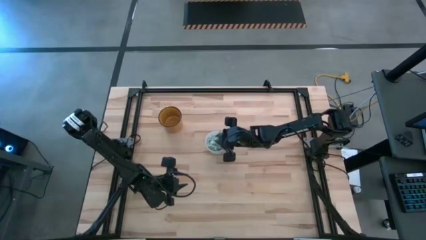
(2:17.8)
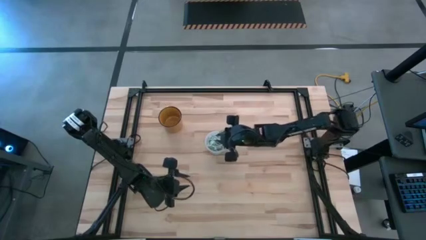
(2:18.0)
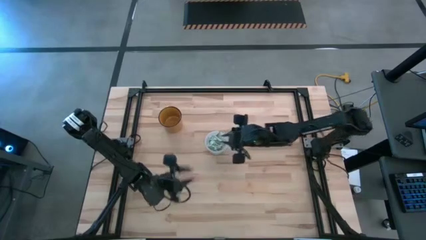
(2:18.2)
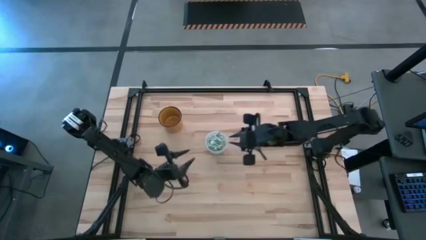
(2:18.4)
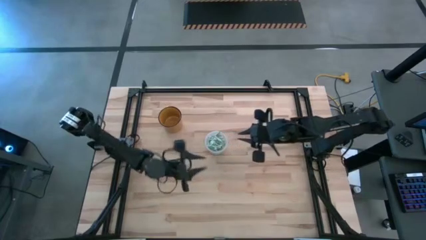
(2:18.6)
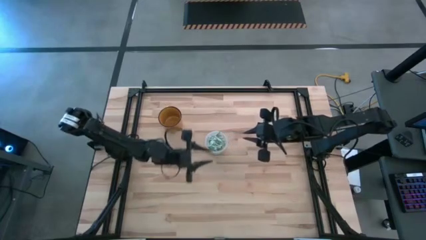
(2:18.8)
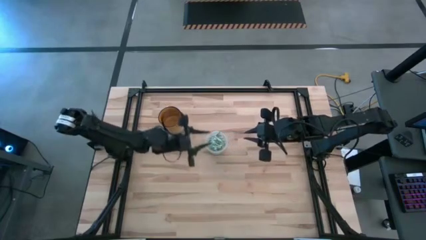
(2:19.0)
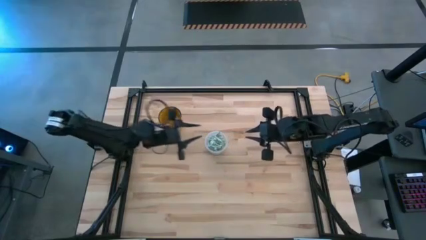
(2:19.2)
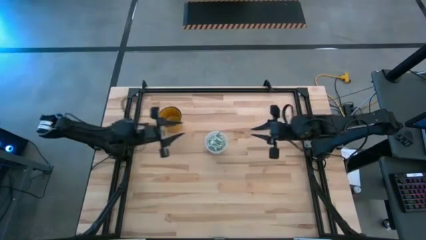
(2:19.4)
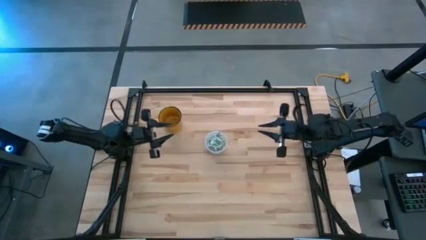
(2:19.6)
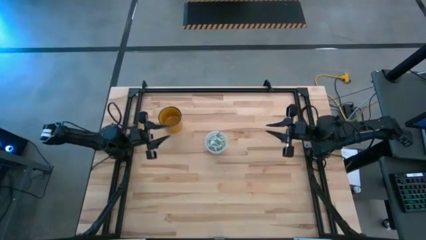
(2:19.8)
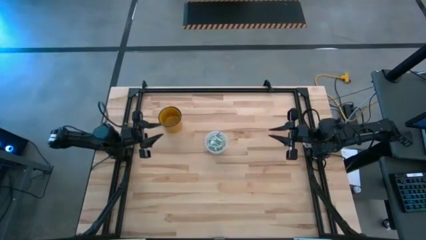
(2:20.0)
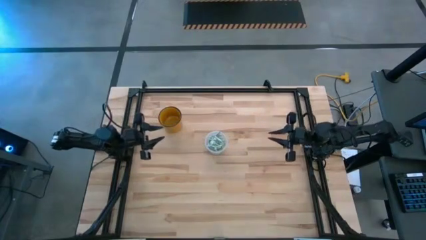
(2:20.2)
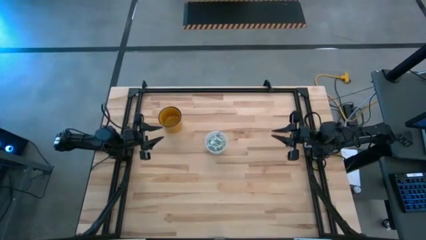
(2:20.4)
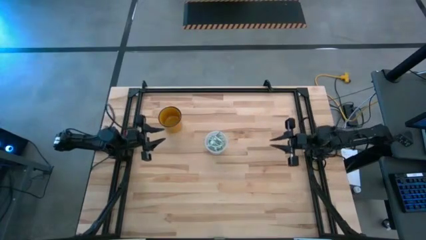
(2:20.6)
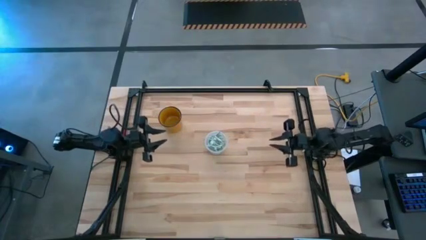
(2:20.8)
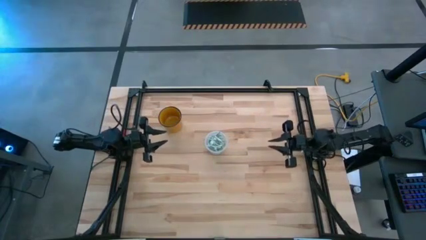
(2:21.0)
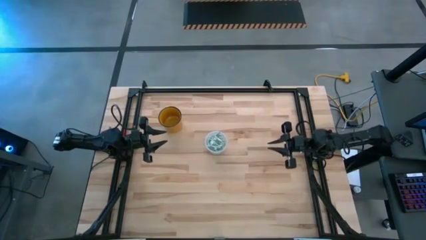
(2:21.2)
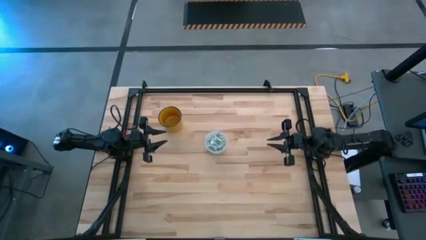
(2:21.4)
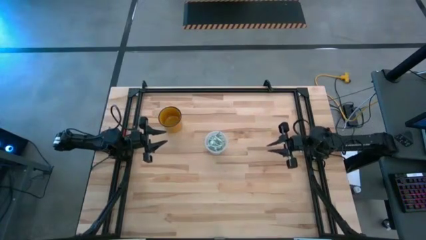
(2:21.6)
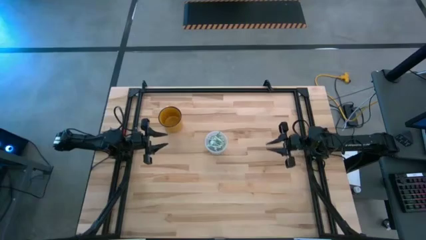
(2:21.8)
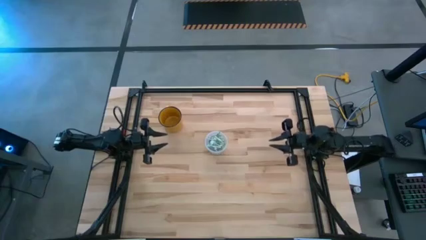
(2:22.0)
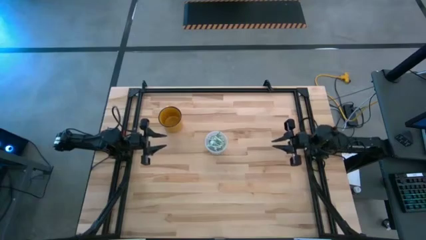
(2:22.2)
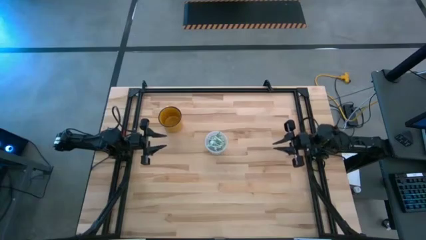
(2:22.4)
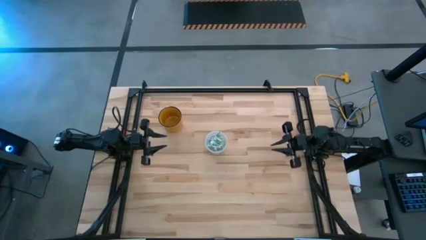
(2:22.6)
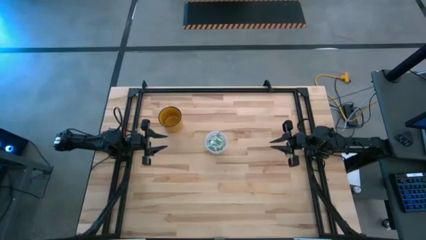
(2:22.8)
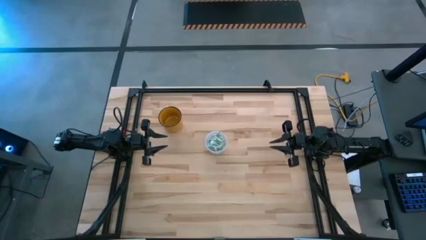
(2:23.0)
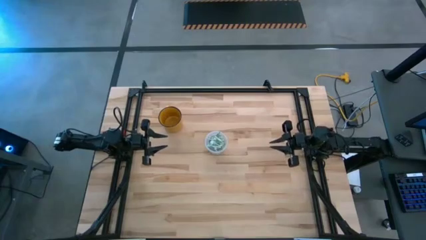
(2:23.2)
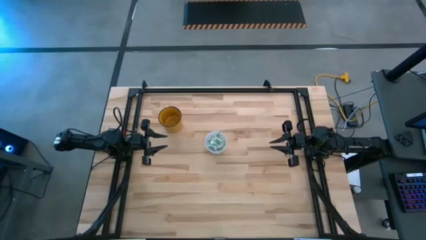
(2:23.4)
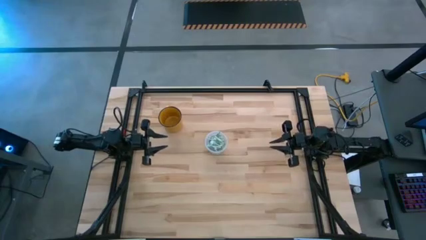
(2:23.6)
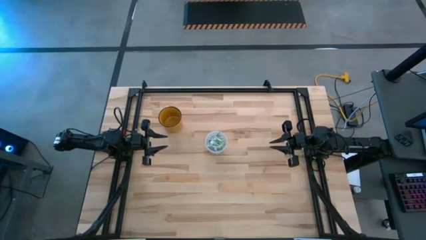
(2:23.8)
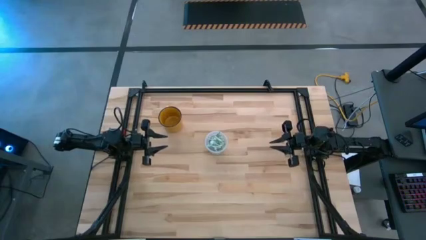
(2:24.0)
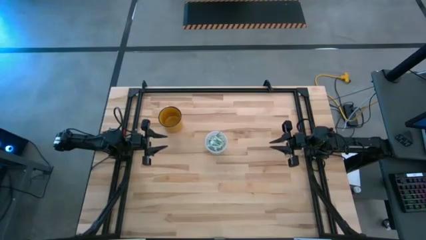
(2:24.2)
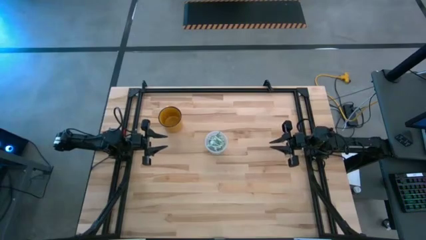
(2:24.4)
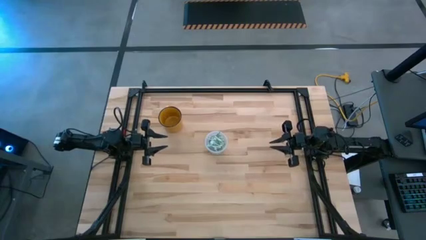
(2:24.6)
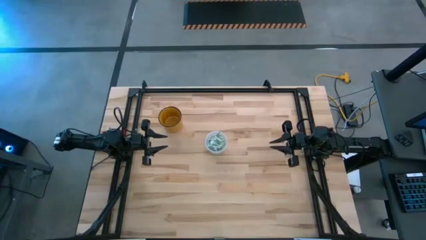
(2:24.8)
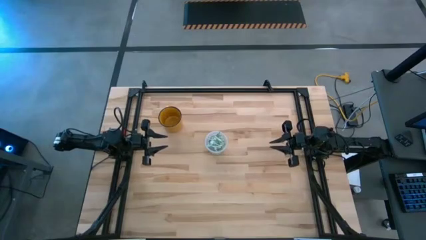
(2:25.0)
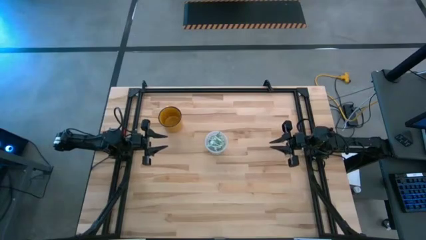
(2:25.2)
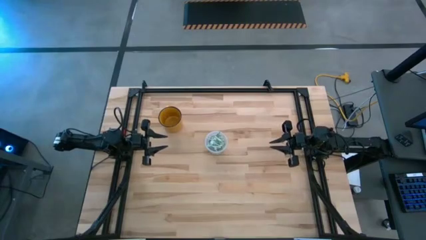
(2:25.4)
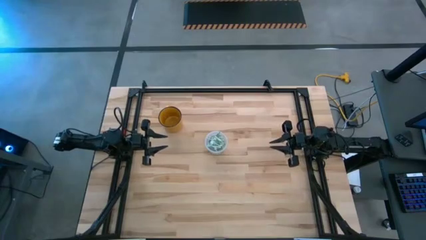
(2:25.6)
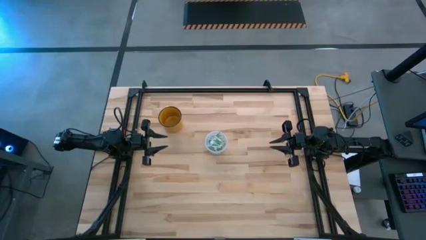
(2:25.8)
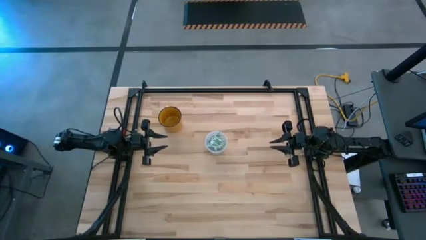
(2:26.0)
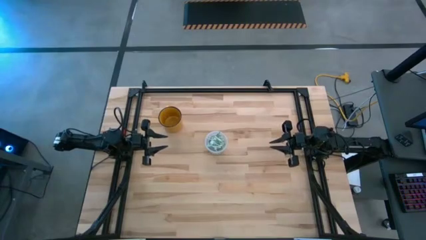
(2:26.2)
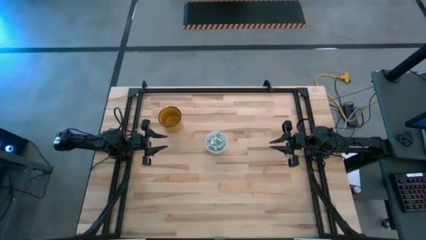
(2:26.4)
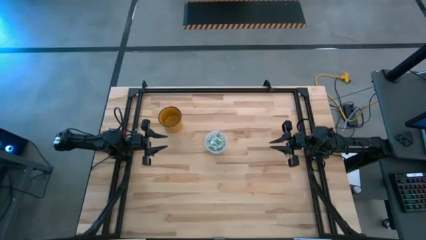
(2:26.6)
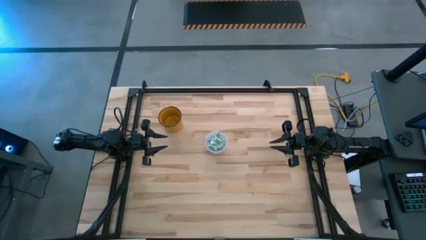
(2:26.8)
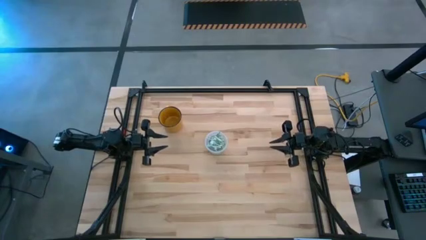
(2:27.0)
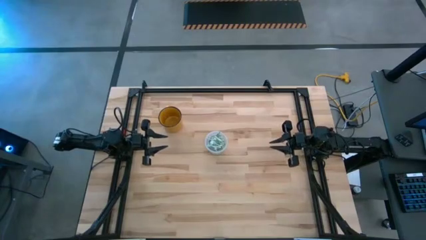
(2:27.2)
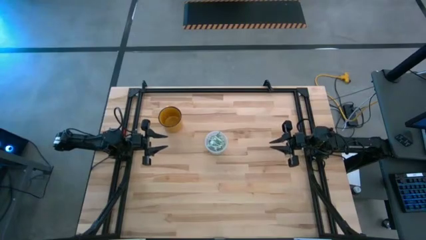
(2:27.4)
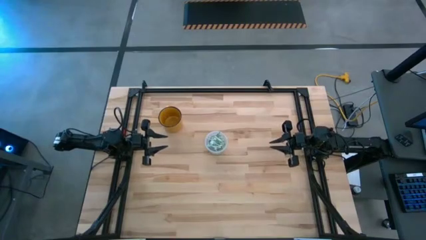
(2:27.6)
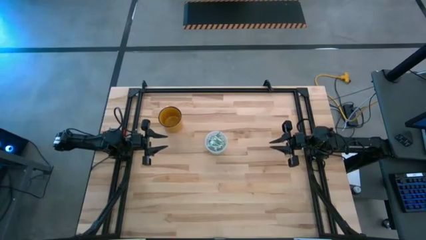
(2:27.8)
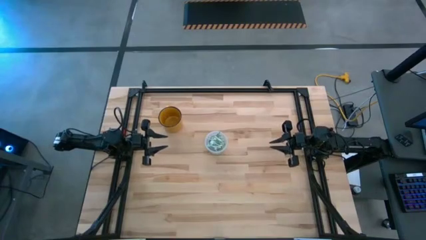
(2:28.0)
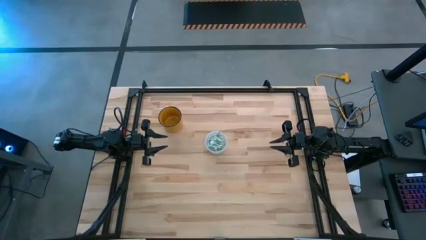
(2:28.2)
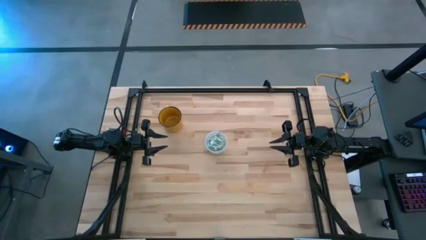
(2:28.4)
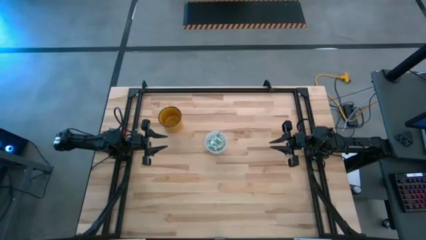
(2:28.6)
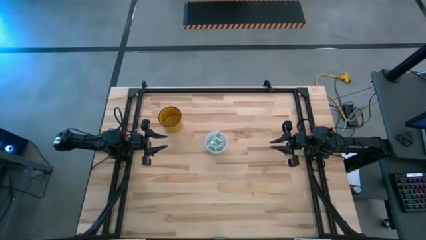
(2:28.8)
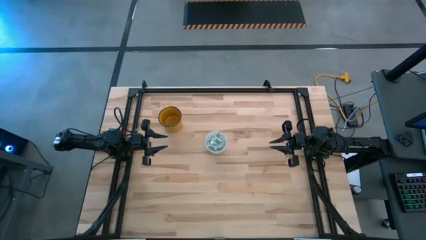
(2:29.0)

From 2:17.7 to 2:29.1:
Task: Pick and place Stevia / Truvia into bins
Return to Home Position

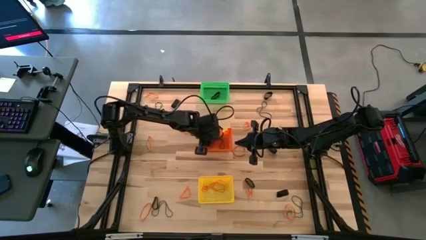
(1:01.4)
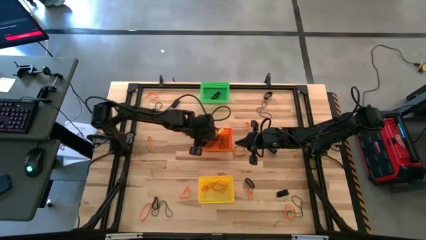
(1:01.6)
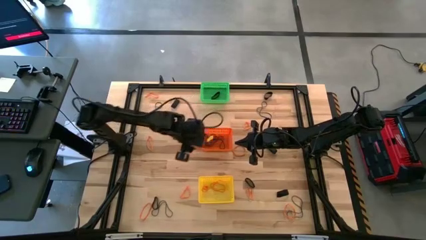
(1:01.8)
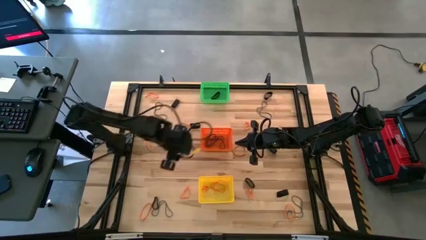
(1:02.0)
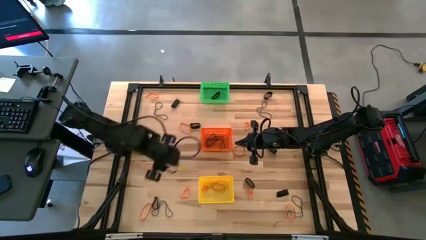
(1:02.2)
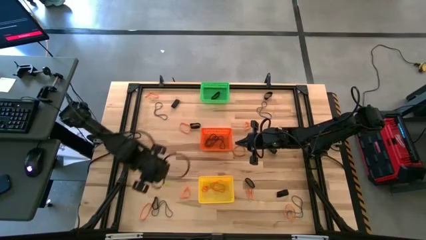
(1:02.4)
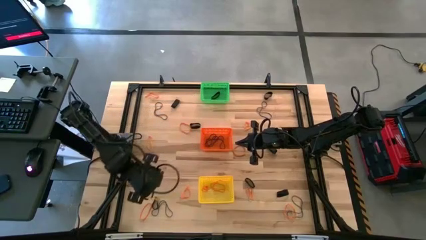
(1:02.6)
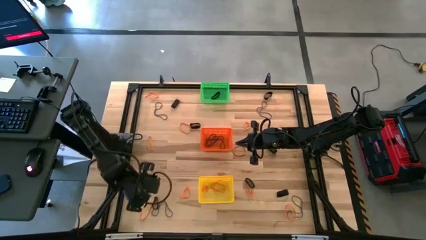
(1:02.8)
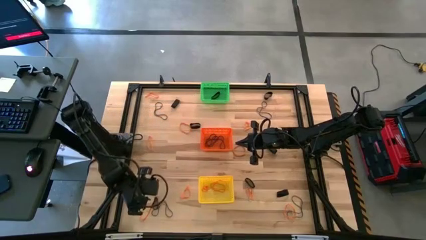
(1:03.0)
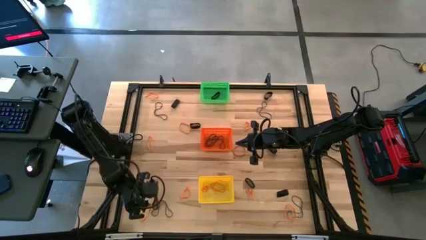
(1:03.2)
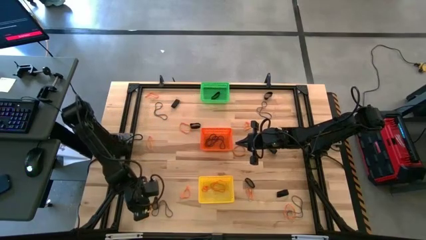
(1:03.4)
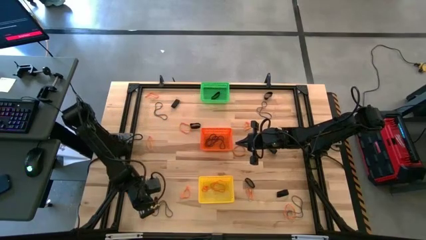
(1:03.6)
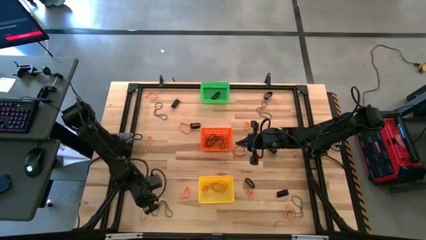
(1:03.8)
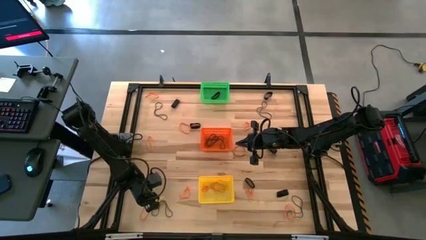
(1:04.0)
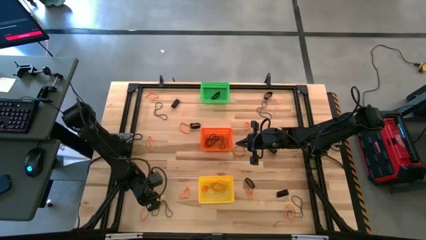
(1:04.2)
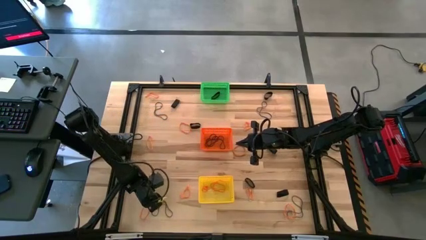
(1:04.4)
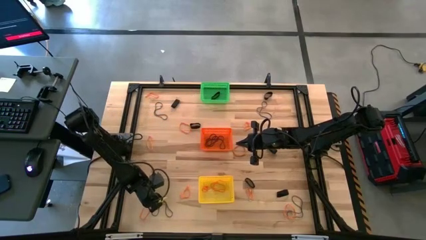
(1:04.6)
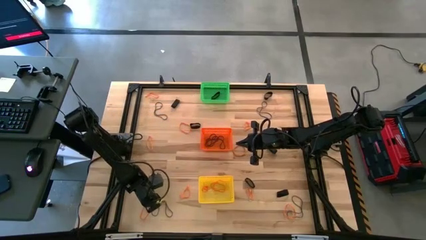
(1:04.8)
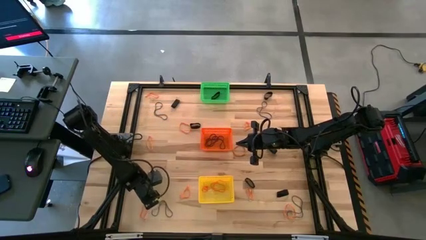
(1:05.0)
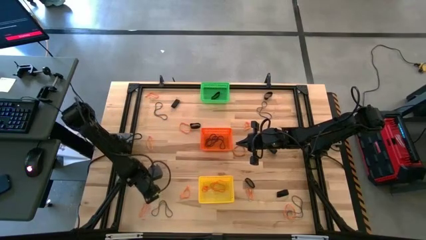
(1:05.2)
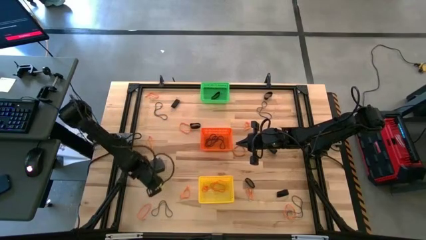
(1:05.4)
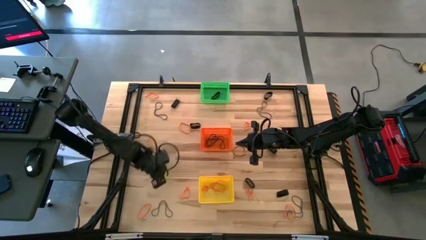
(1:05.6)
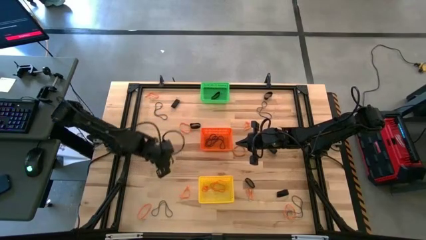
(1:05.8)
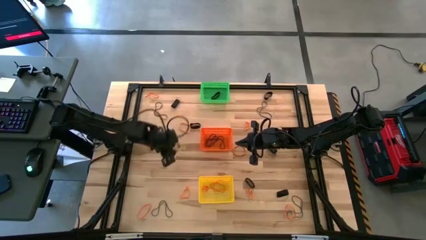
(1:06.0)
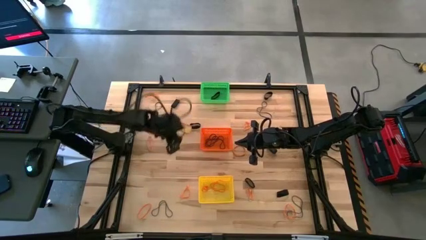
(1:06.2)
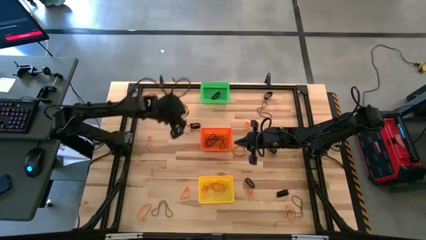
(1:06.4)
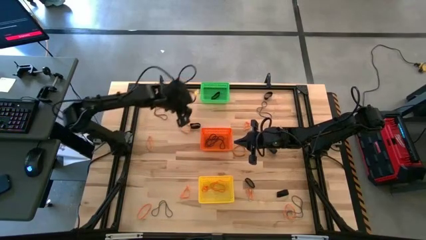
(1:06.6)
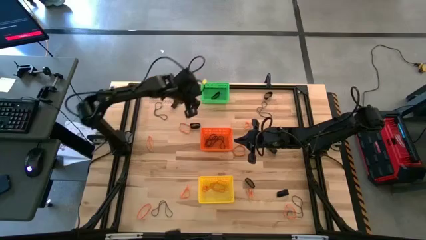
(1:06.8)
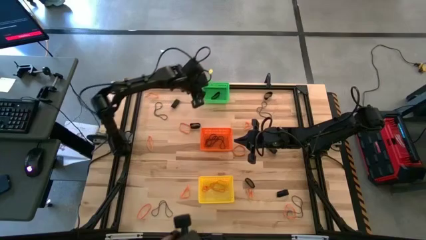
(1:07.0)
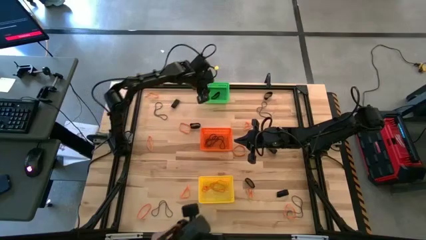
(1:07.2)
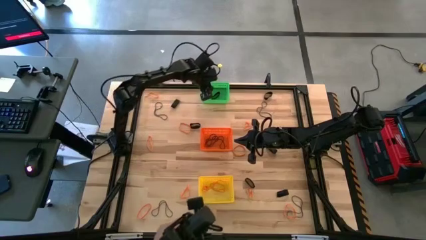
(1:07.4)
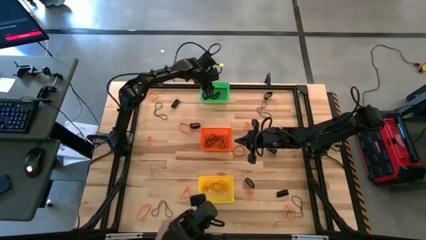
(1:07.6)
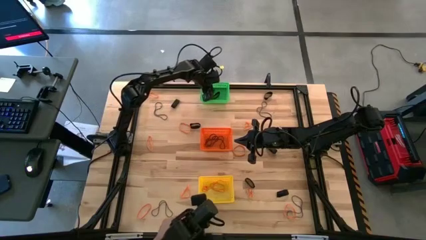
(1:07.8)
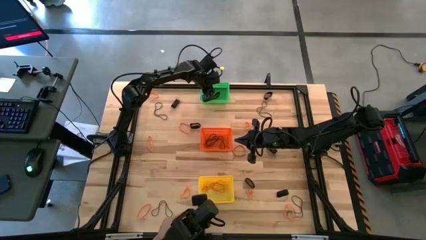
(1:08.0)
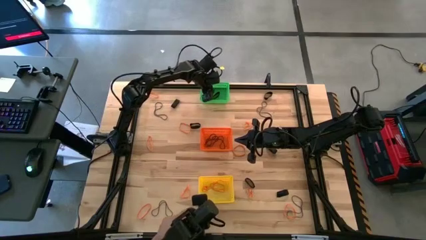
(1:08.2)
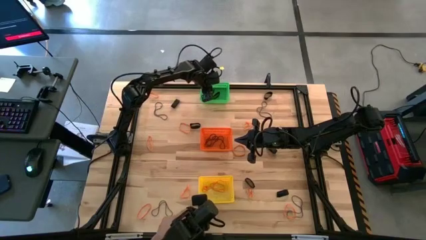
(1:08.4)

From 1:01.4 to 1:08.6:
Task: Sort rubber bands into baskets
Put the black rubber band into the green bin
